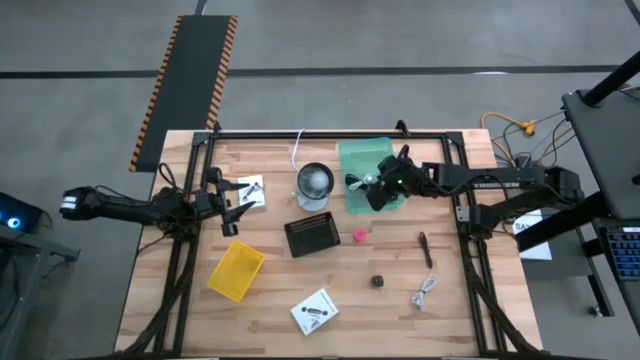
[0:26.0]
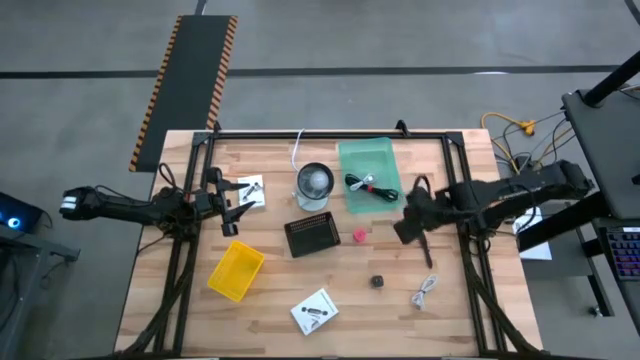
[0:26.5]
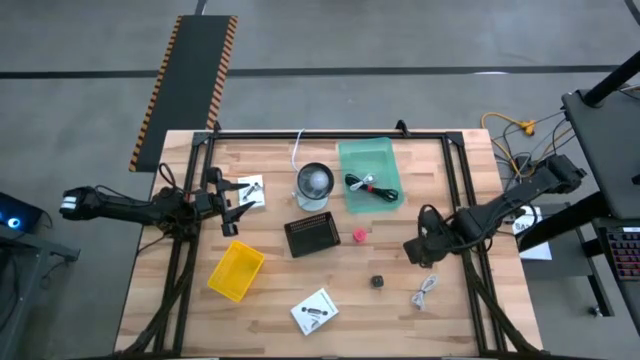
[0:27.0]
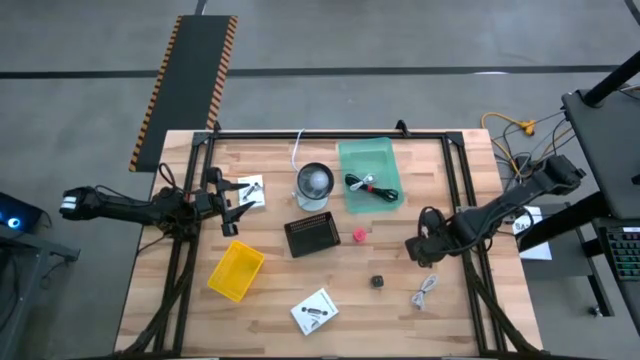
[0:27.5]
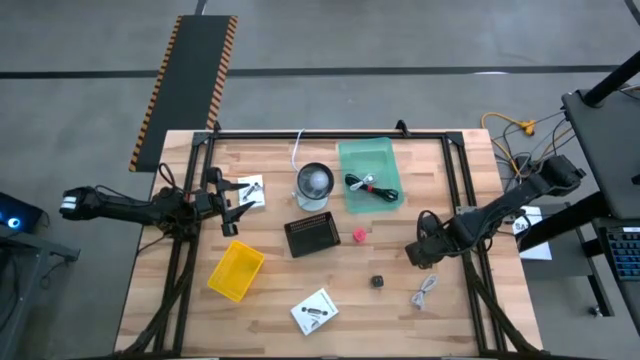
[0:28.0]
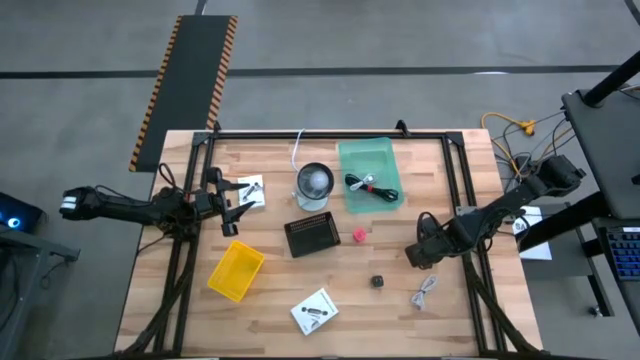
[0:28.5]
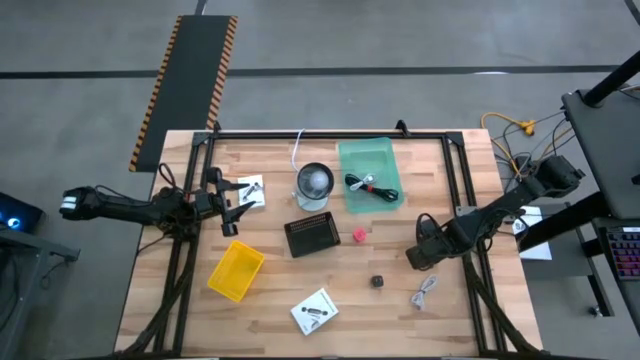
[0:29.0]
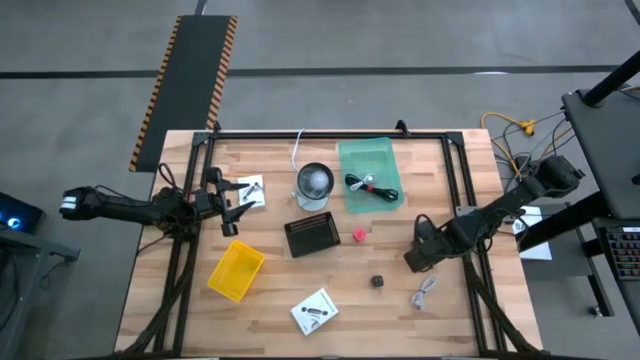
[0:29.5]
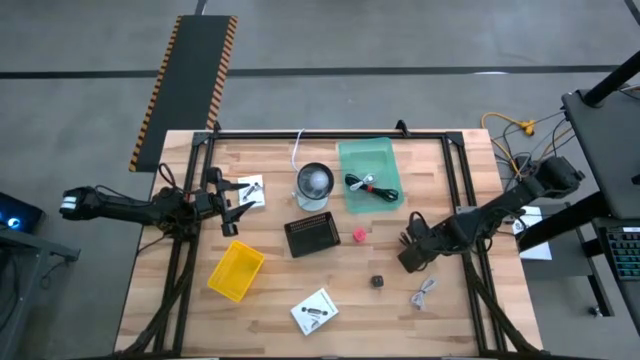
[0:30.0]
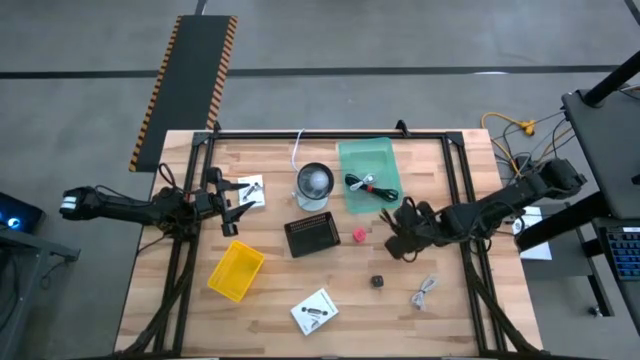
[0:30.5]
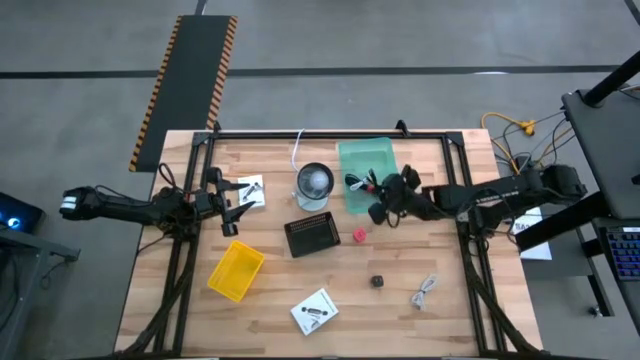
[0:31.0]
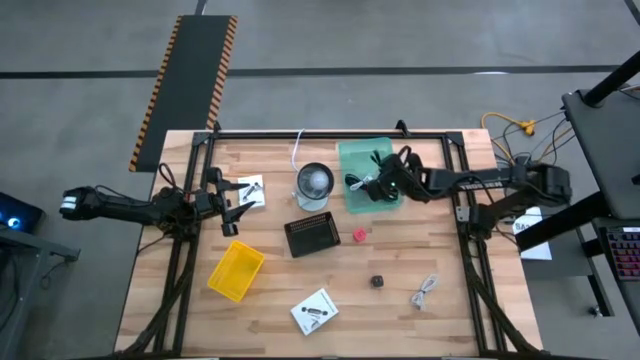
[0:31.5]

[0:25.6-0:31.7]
Task: Pick and place items into bin
Put the black charger cable into the blue bin

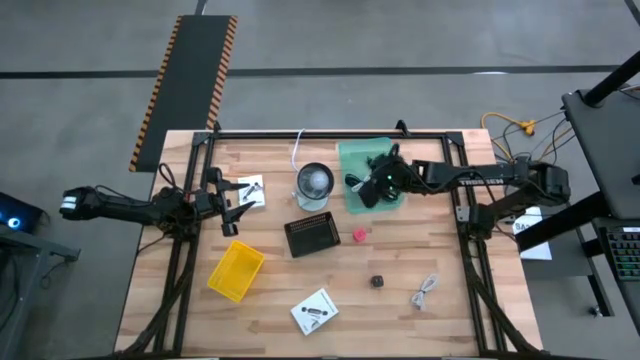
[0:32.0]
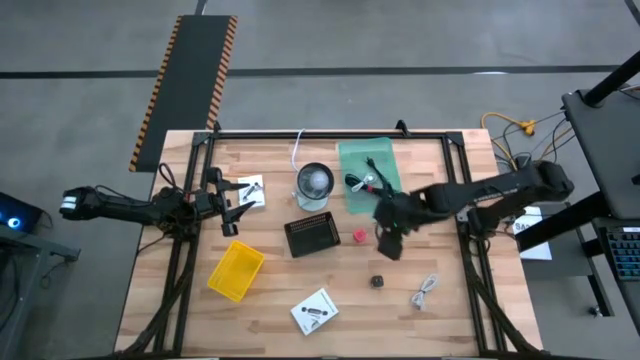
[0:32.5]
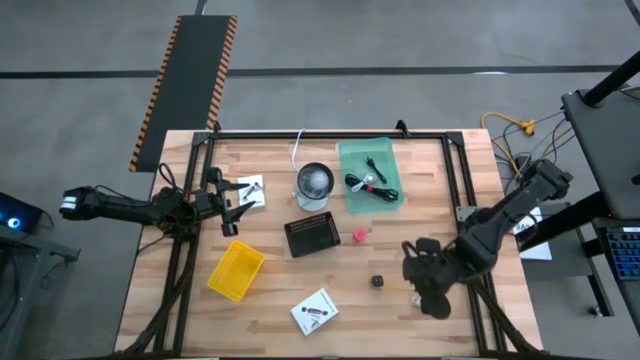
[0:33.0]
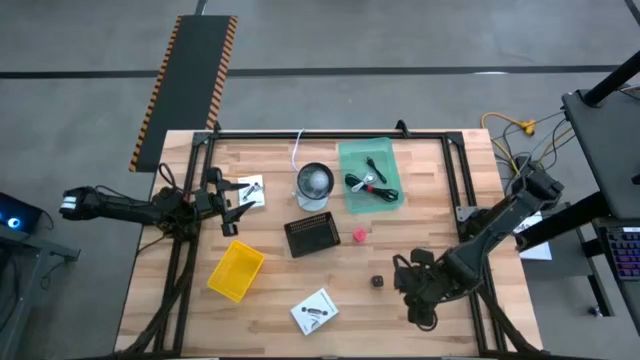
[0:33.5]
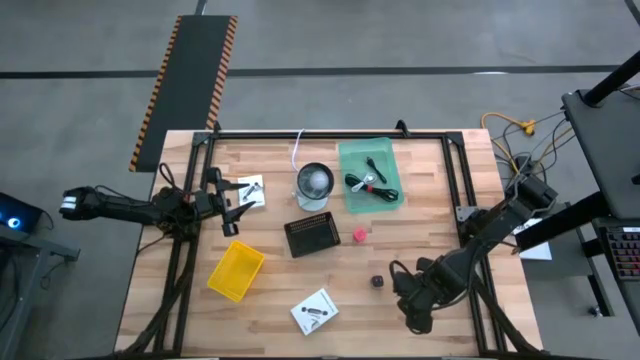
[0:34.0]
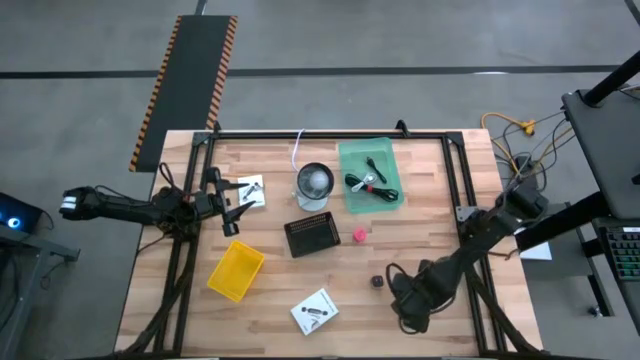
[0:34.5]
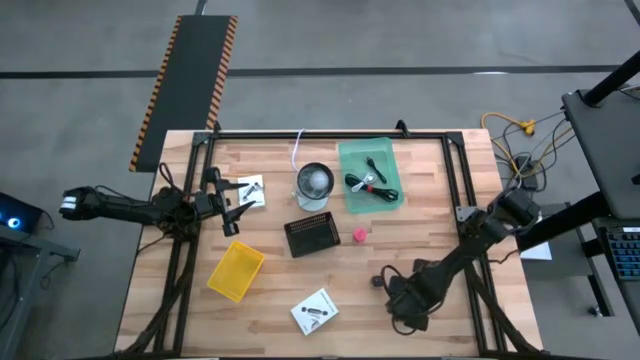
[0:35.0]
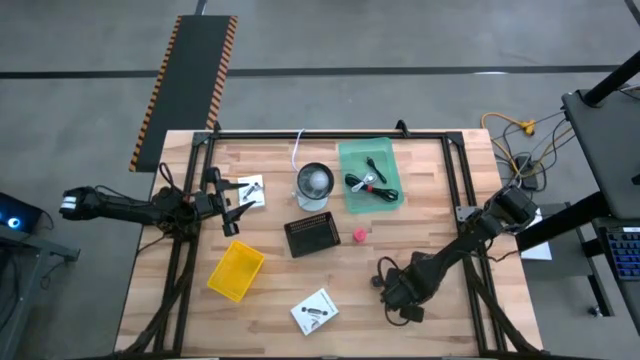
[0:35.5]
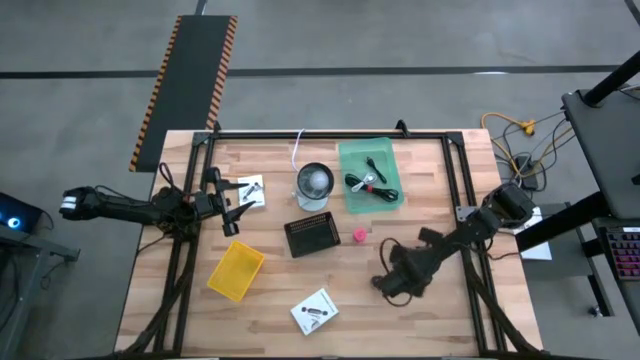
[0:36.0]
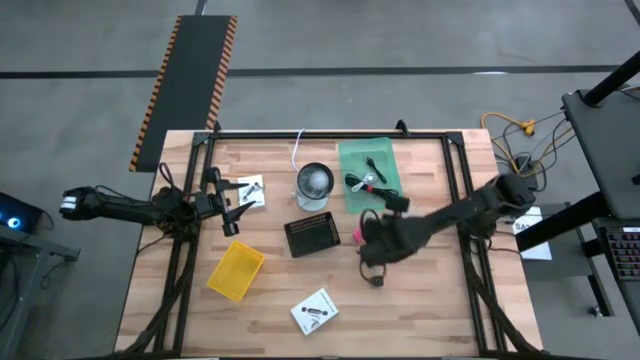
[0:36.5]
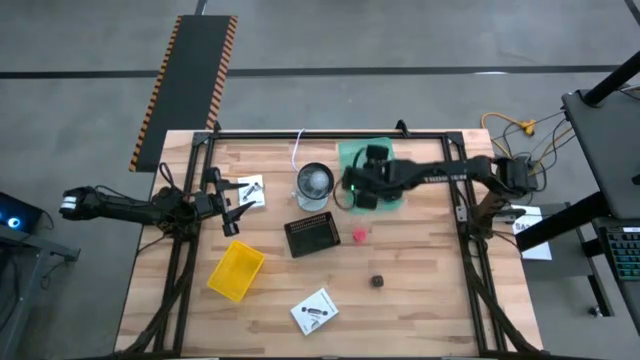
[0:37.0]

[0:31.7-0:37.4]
Put the white charger cable into the blue bin

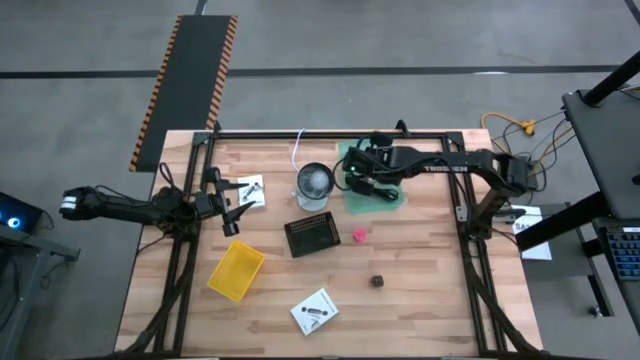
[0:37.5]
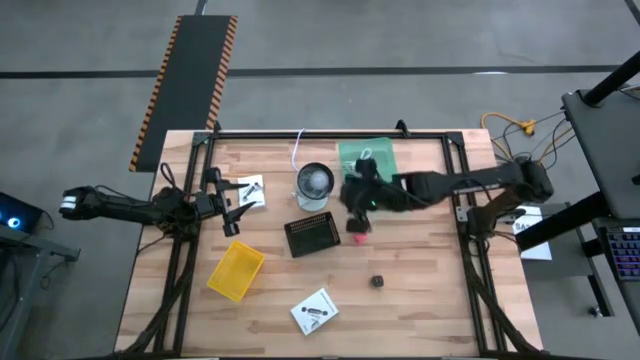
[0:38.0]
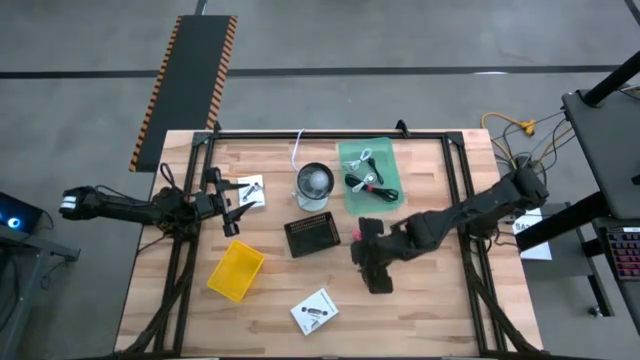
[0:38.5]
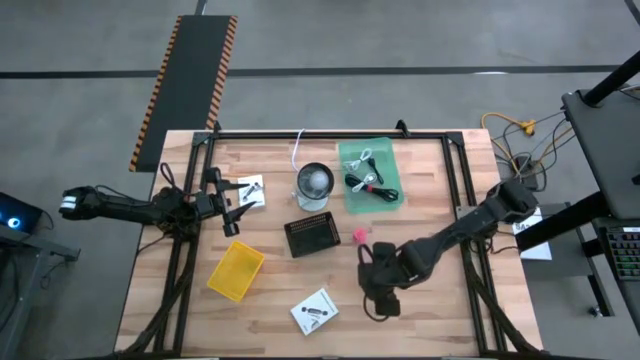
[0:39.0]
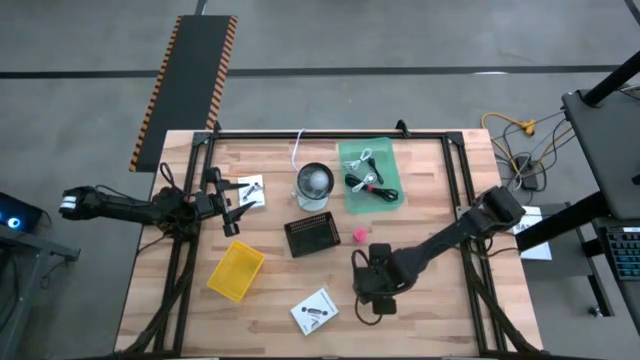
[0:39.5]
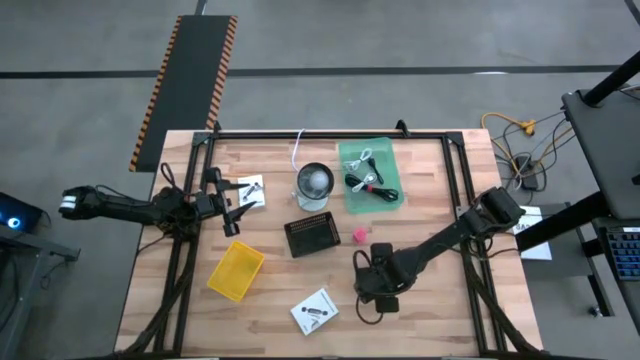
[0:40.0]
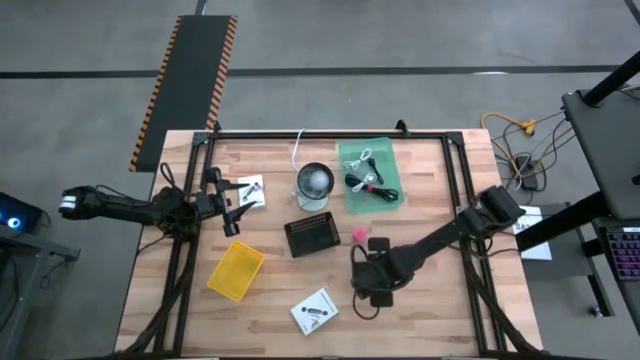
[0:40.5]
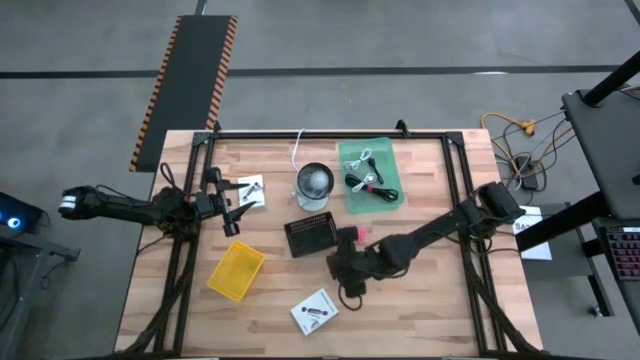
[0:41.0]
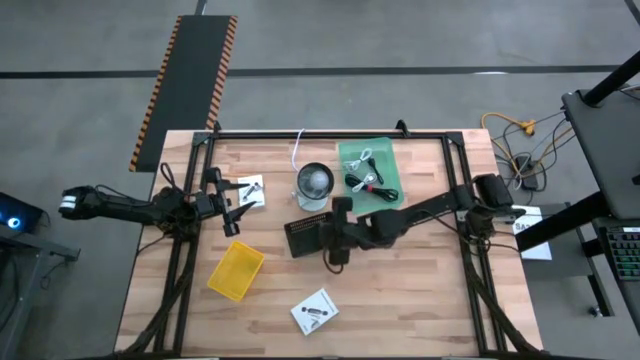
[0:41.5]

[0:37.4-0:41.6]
Put the black charger adapter into the black bin

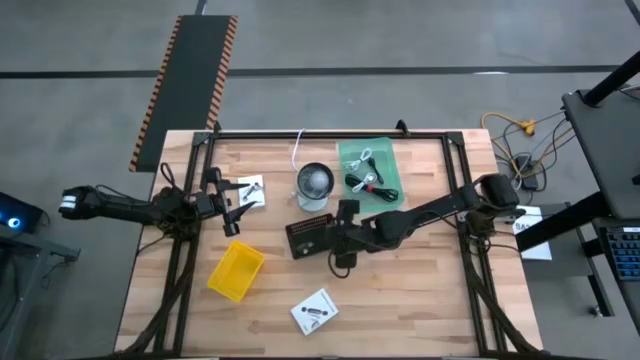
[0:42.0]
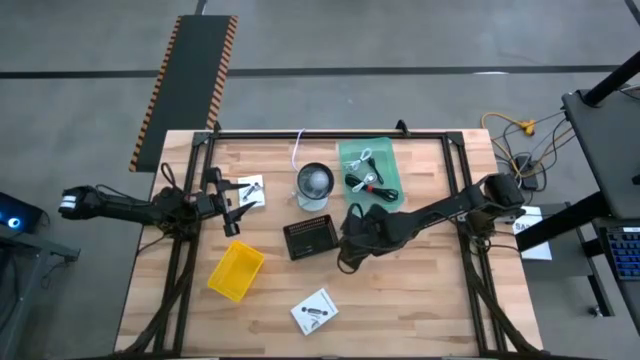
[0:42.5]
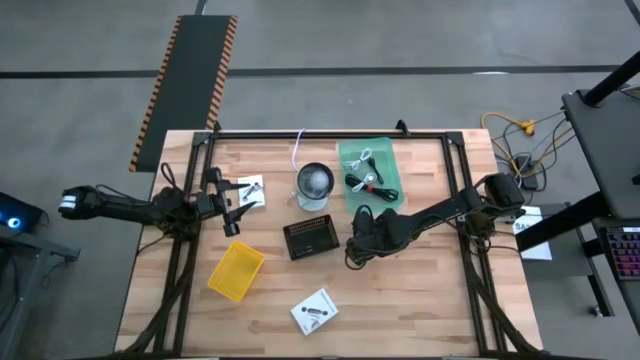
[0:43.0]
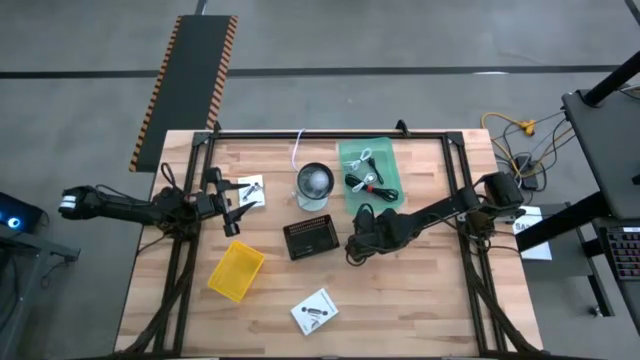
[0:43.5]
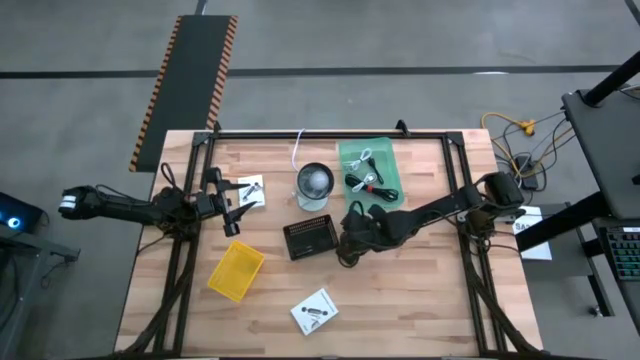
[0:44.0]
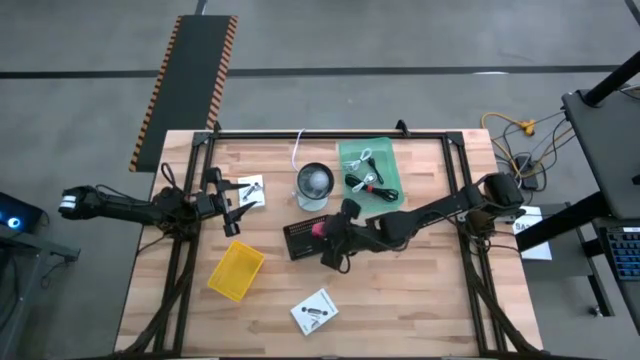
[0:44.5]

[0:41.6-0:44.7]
Put the pink charger adapter into the black bin
